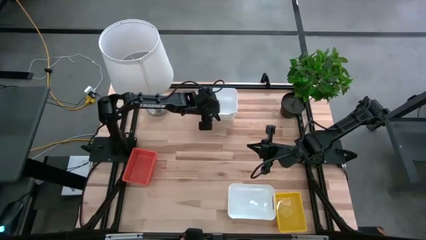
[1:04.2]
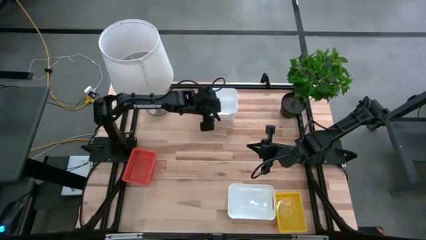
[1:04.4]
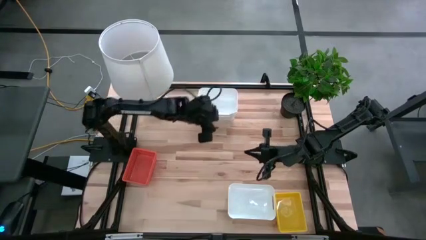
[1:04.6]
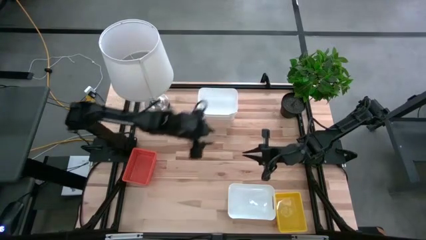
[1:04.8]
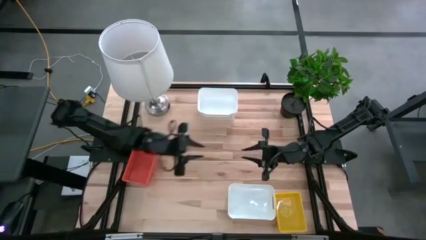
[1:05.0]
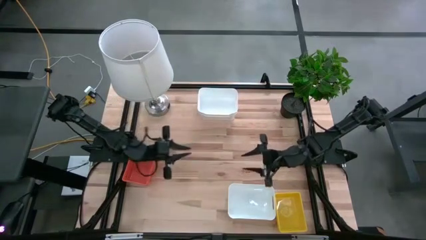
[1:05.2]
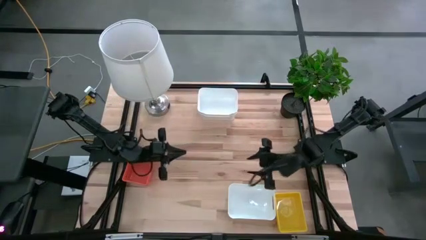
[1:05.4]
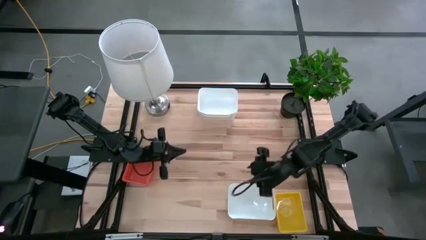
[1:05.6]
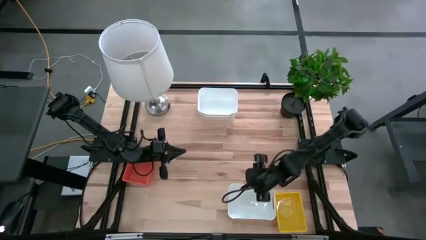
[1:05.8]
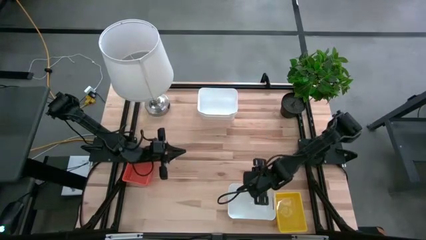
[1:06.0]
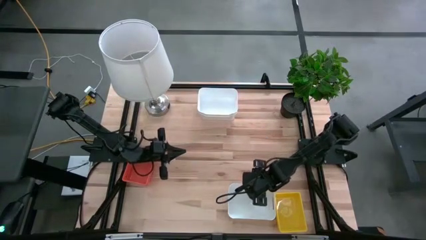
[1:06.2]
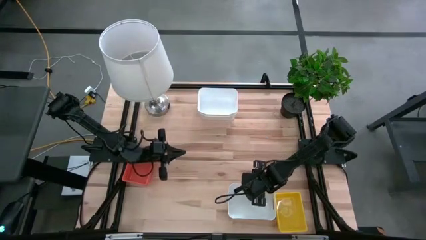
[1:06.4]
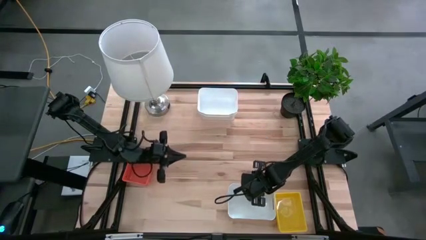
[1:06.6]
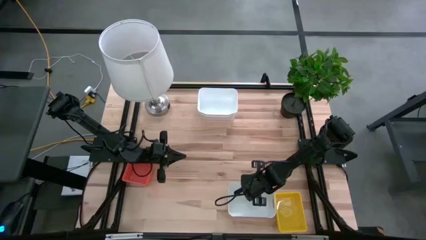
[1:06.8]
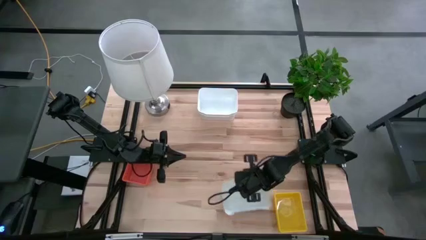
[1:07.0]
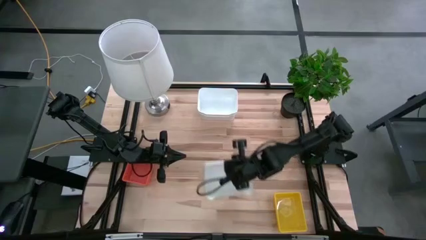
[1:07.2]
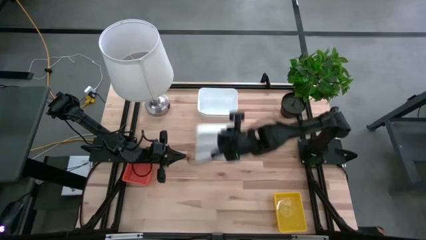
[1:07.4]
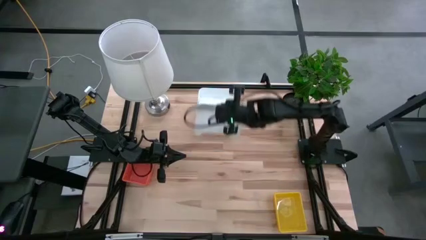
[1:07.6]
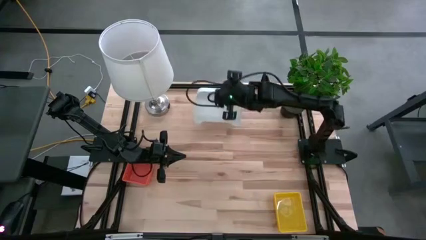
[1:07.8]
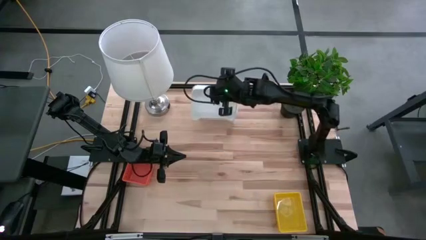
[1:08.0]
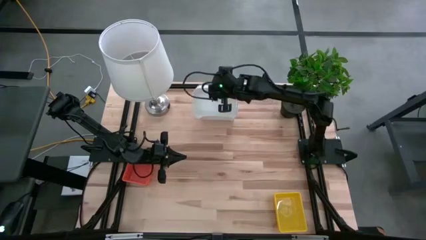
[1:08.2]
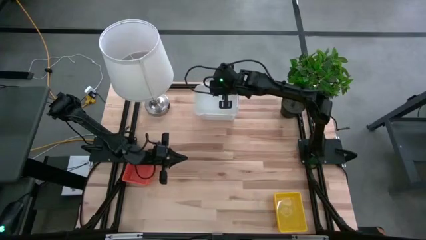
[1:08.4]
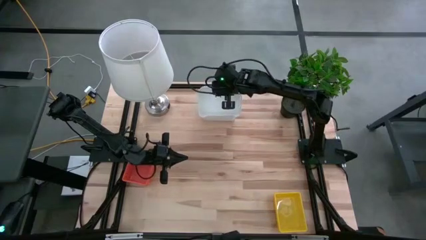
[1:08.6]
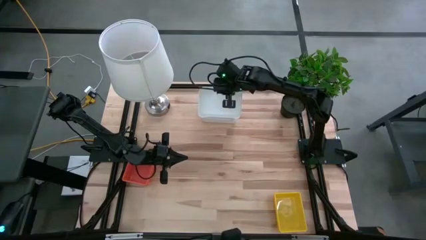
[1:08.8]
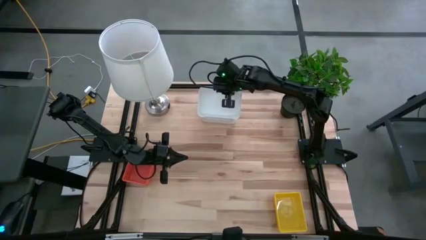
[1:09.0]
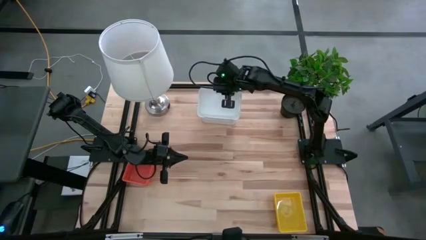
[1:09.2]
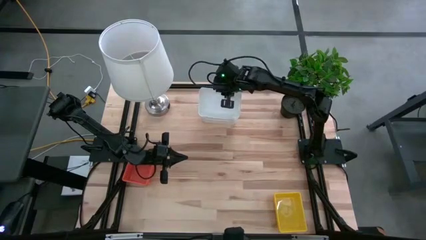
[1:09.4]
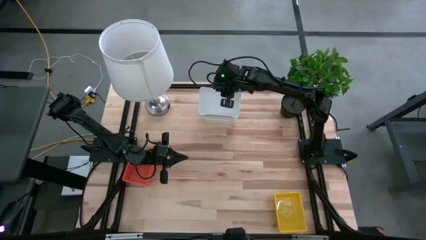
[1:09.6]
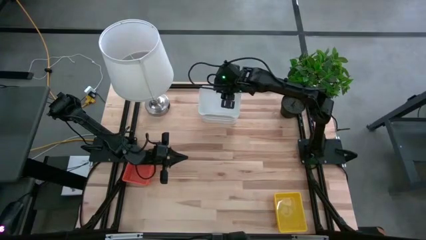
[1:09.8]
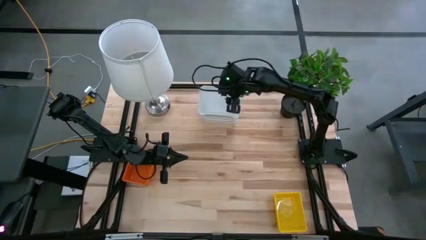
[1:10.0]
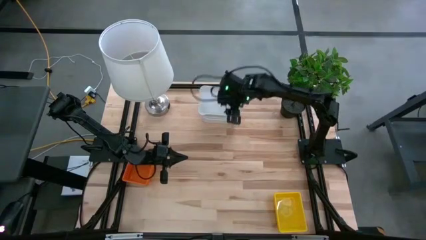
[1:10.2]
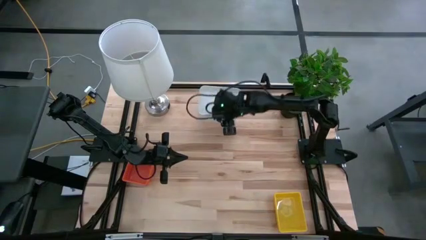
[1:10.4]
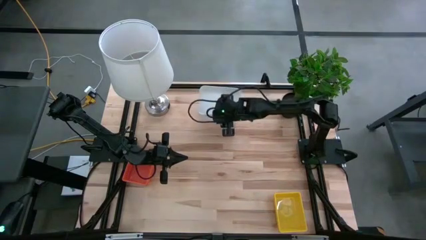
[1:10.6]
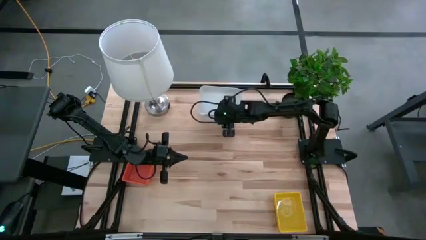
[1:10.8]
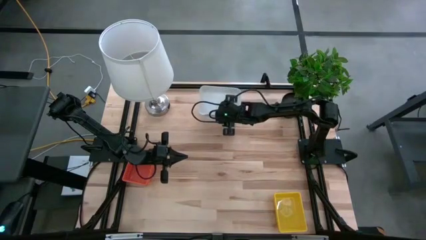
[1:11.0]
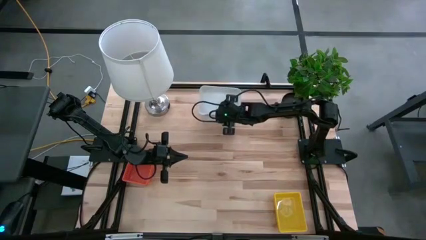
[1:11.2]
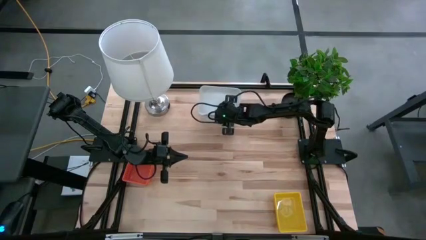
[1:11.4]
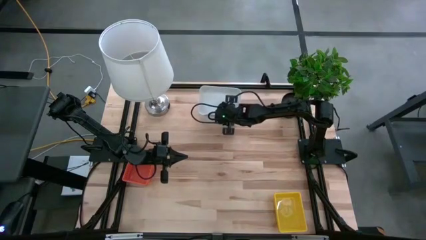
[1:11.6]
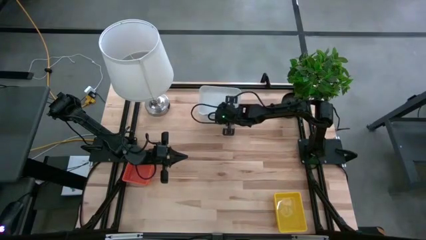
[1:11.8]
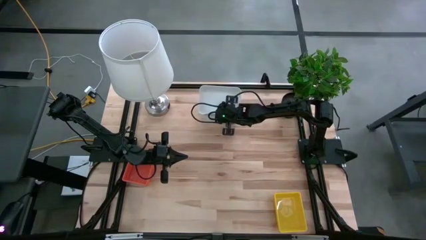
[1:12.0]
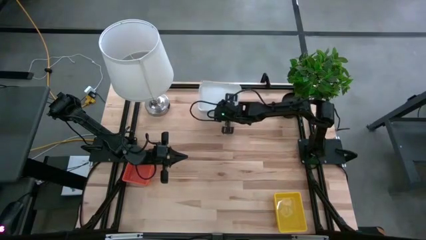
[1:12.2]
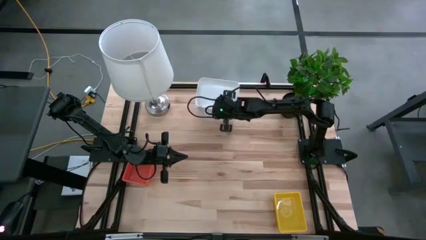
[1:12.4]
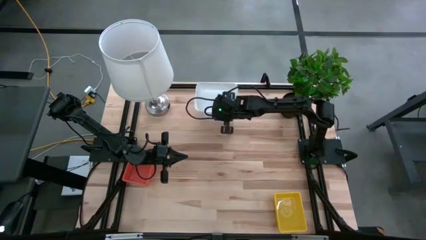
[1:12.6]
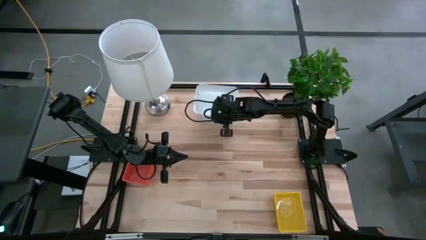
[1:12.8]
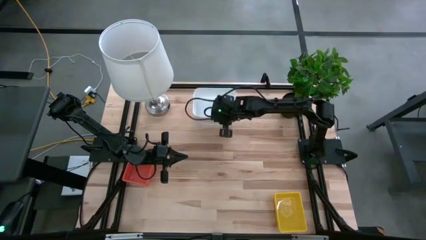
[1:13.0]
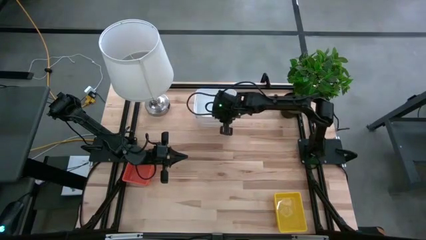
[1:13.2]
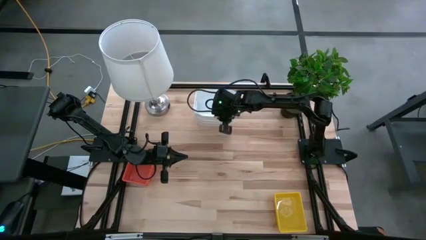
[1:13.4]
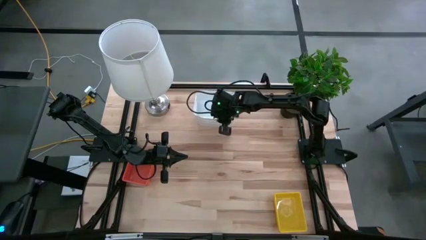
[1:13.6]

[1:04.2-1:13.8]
Stack the bottom white bin on the top stacked white bins

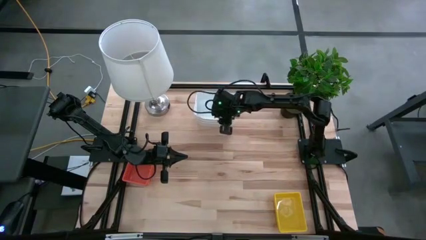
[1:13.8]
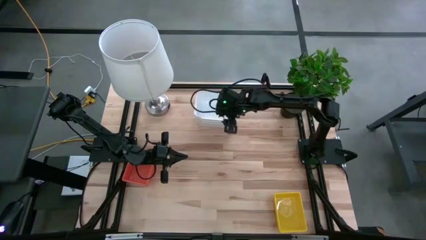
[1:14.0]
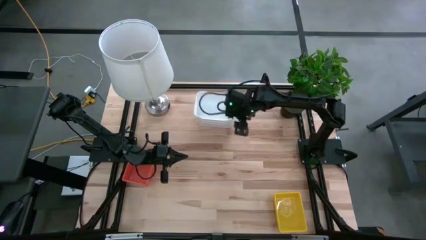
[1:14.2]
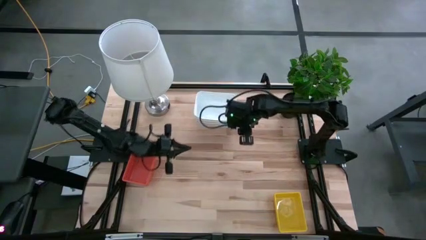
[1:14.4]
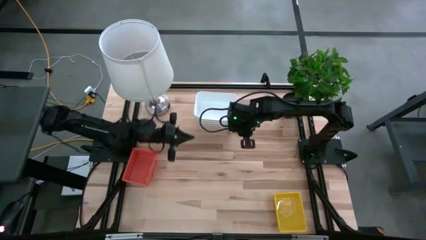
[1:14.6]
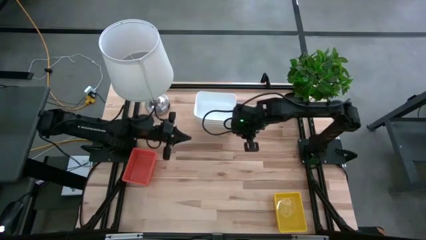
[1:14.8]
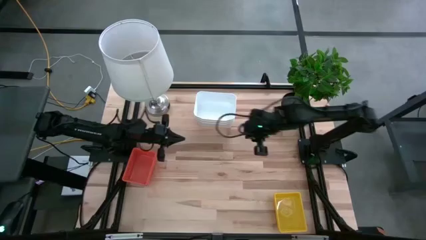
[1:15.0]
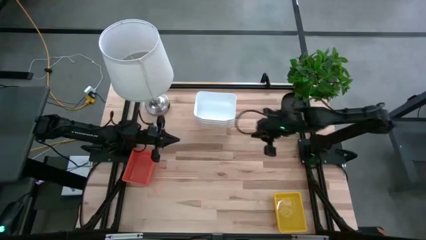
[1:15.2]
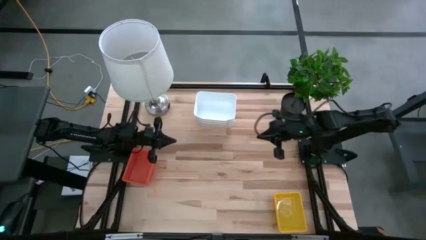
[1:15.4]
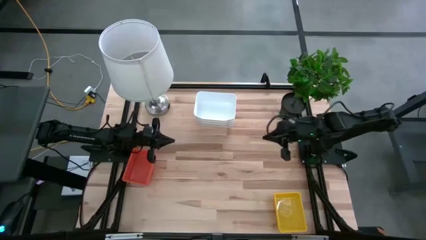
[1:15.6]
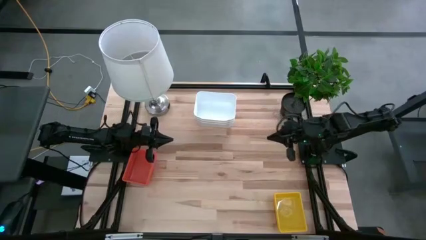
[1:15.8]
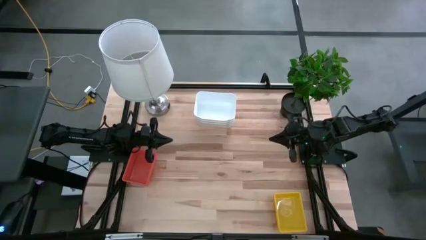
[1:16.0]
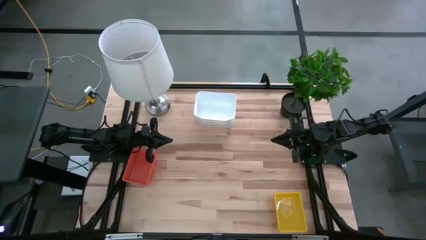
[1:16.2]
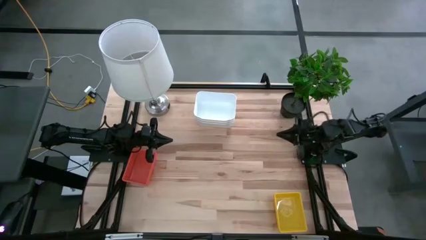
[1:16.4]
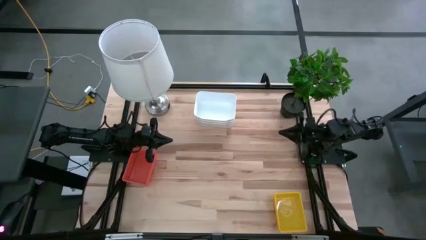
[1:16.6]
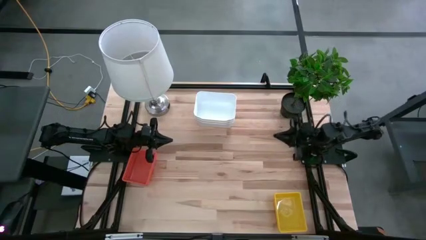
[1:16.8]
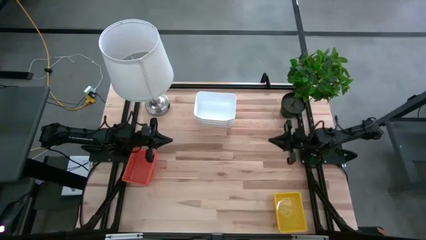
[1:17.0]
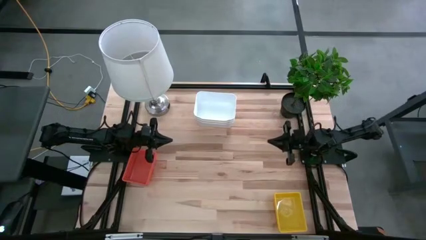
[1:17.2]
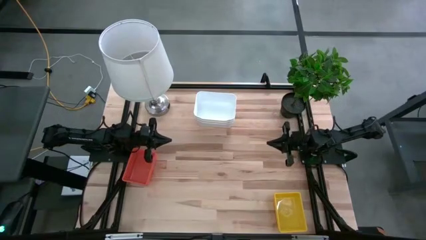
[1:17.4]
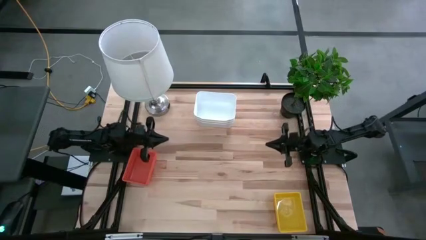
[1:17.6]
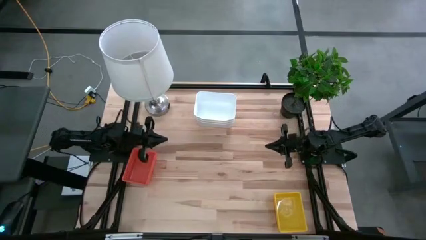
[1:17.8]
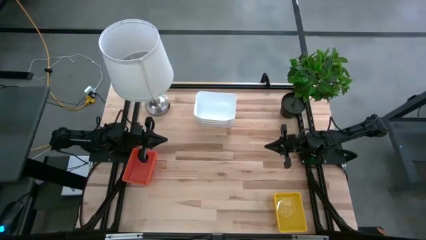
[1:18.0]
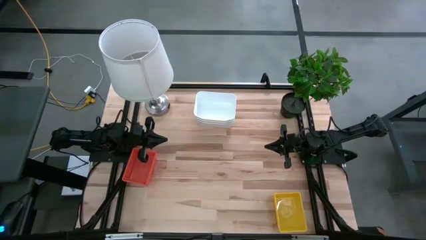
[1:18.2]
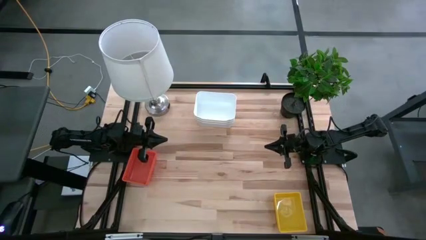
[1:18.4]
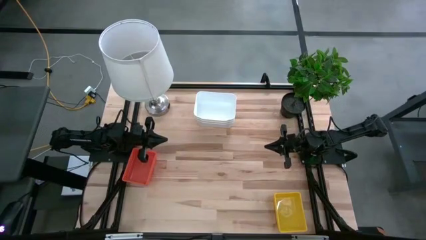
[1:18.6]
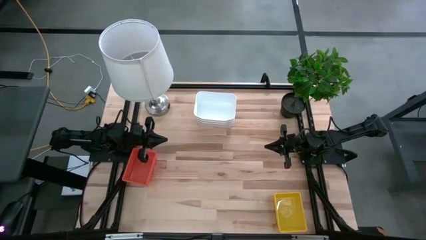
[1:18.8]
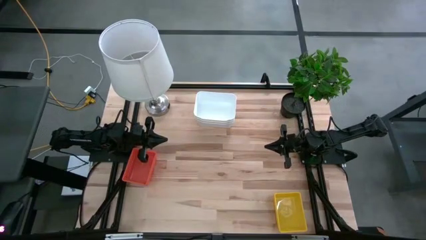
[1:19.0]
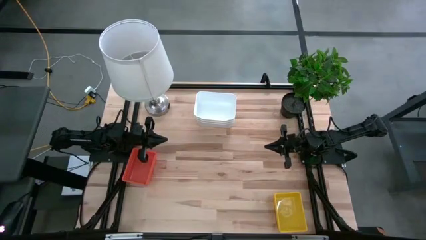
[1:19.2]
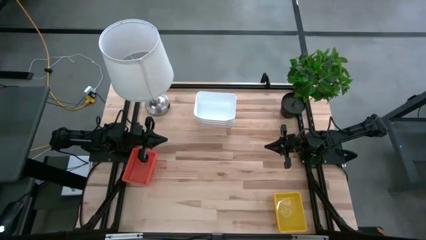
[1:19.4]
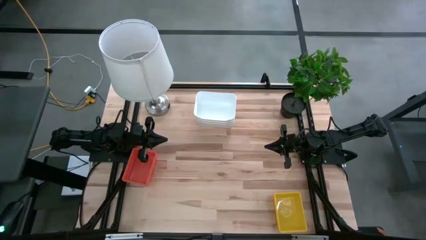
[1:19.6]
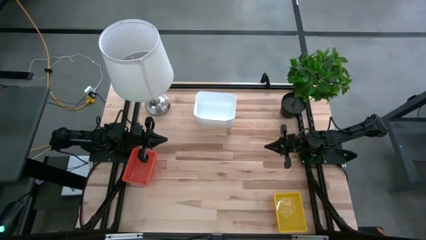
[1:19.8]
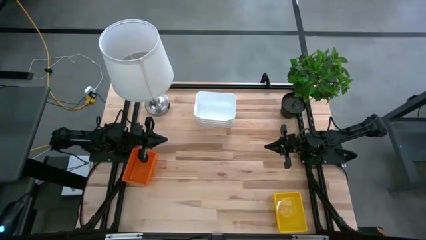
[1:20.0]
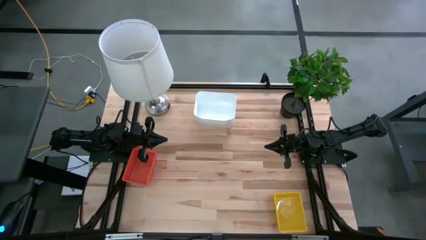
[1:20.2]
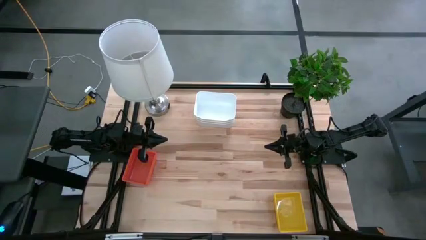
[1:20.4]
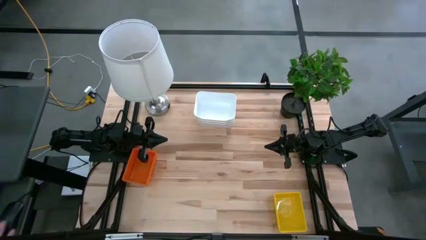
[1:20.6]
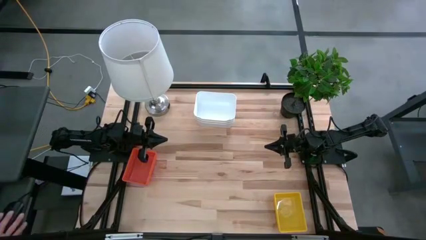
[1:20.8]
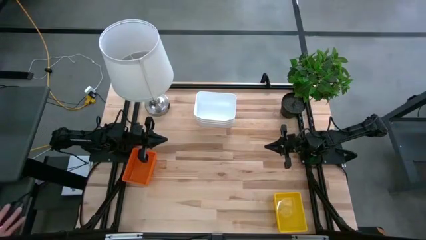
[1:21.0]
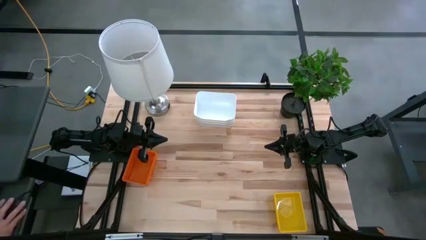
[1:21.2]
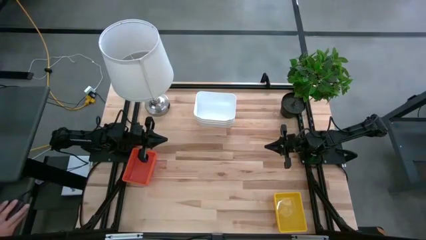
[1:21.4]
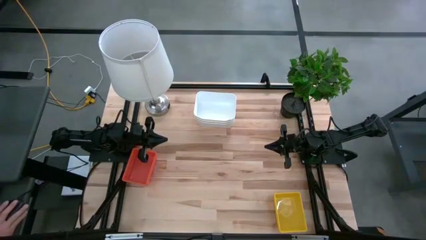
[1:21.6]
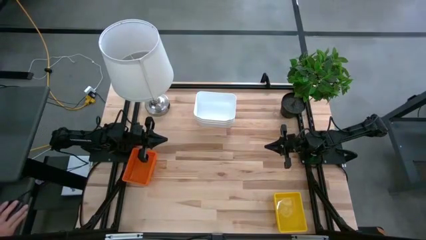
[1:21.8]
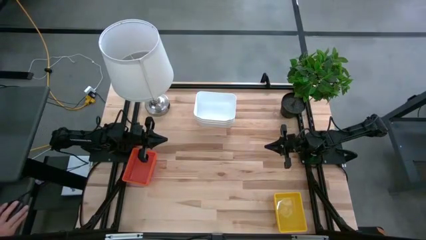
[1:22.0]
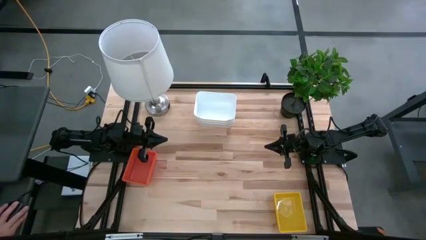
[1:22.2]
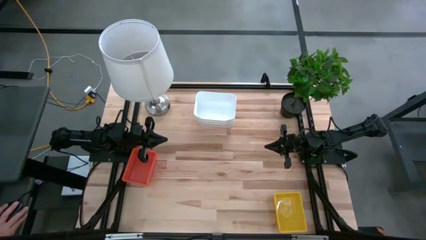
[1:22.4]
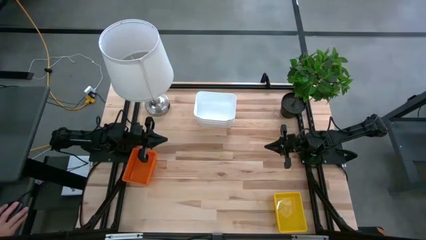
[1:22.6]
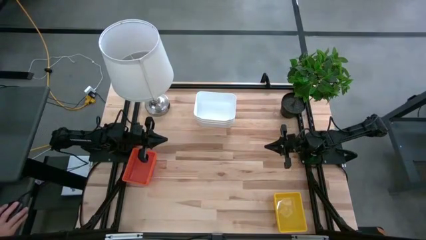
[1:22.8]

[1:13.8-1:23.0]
Return to Home Position
